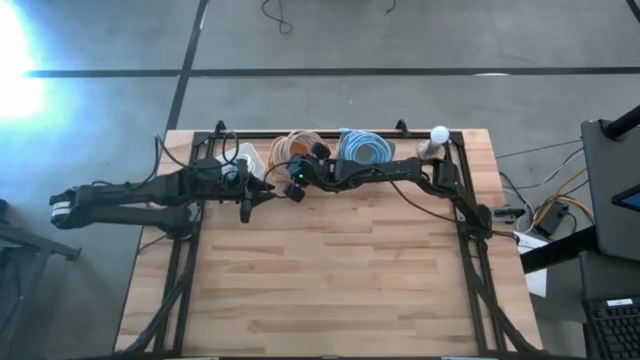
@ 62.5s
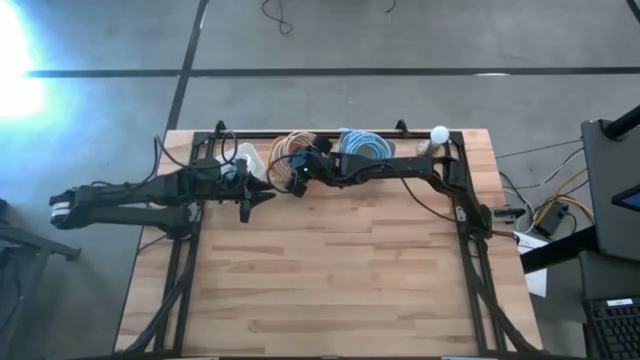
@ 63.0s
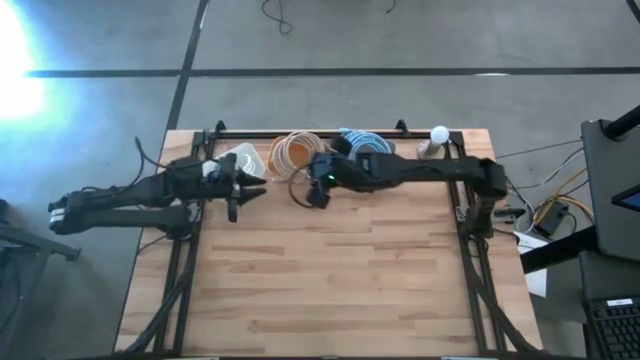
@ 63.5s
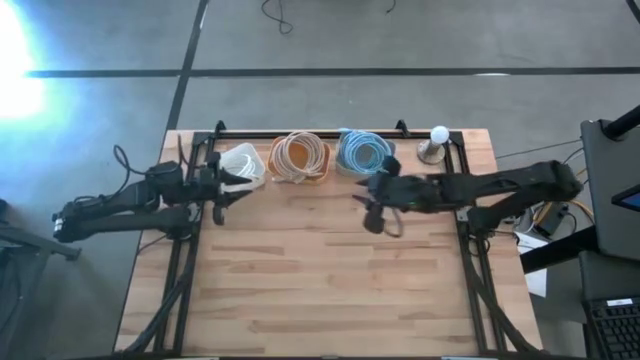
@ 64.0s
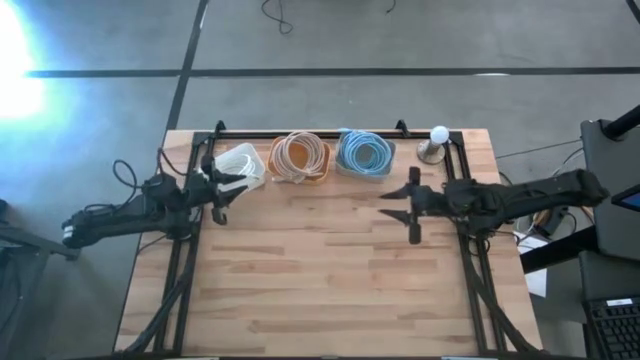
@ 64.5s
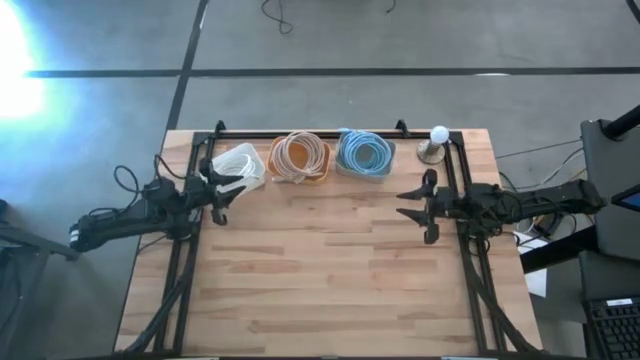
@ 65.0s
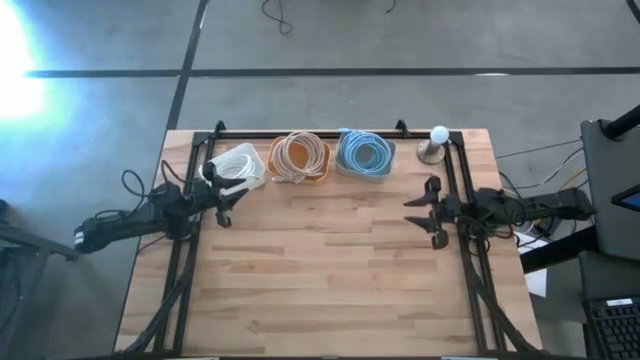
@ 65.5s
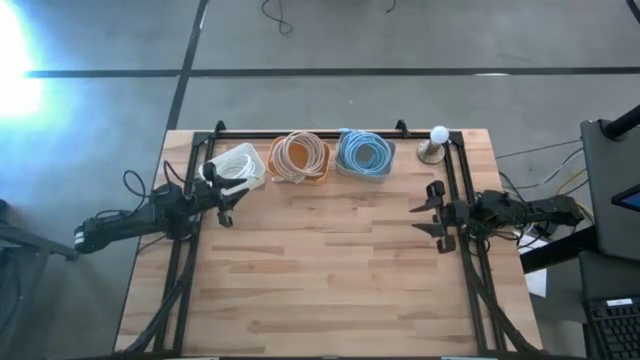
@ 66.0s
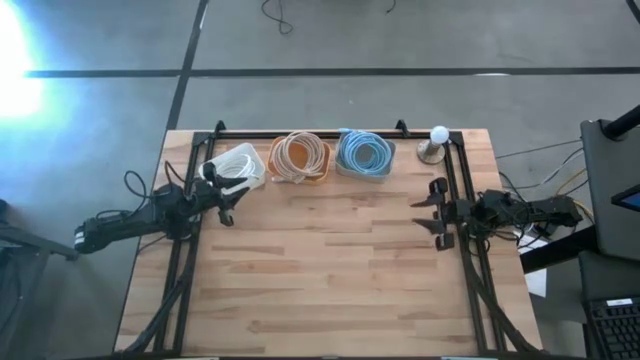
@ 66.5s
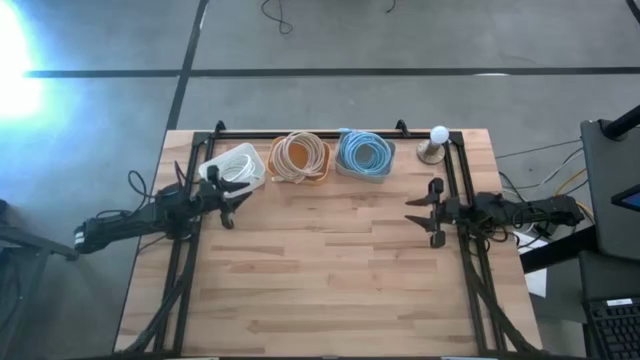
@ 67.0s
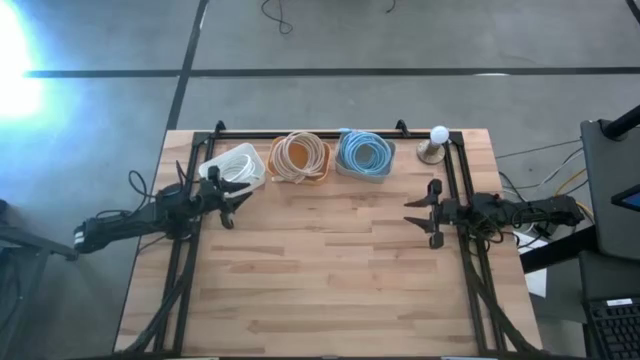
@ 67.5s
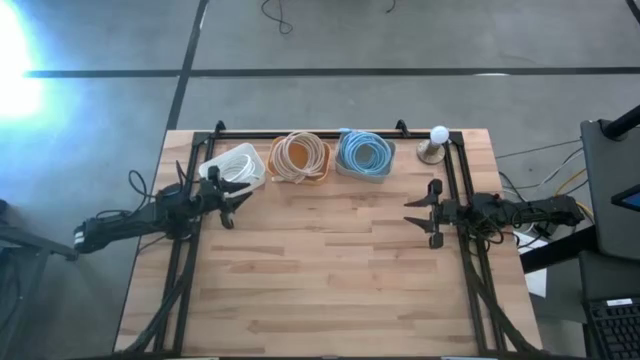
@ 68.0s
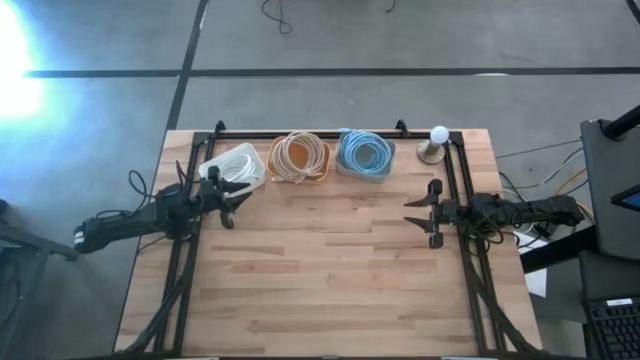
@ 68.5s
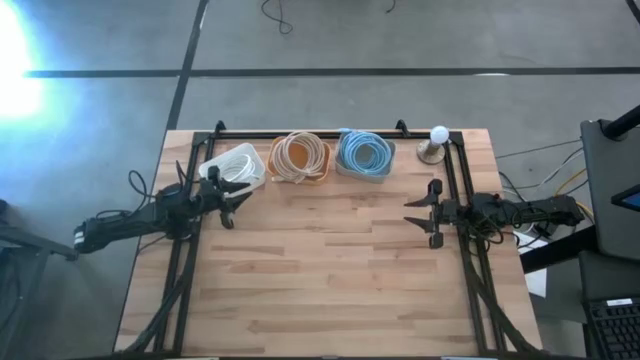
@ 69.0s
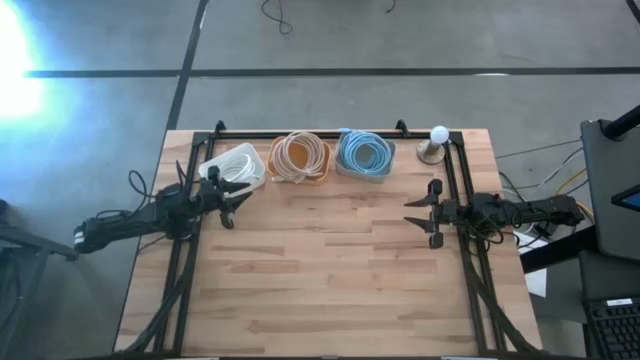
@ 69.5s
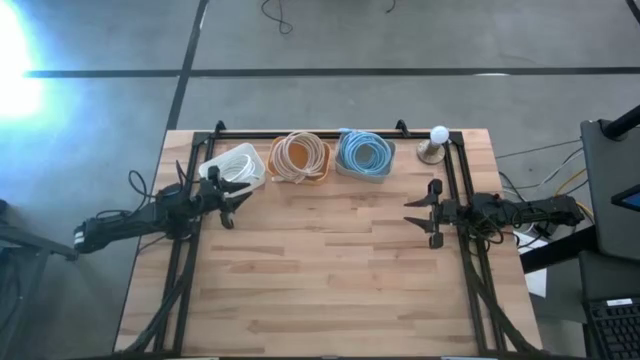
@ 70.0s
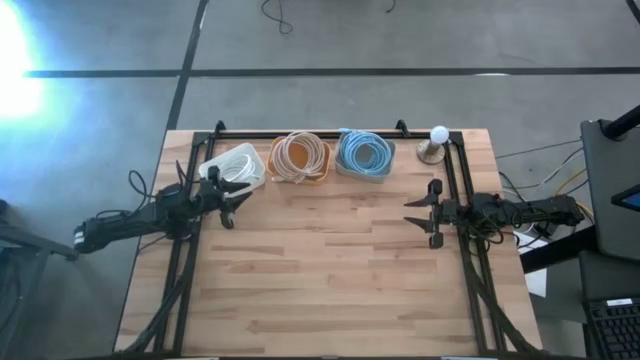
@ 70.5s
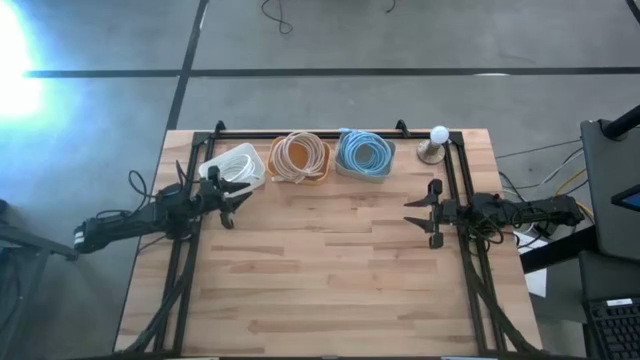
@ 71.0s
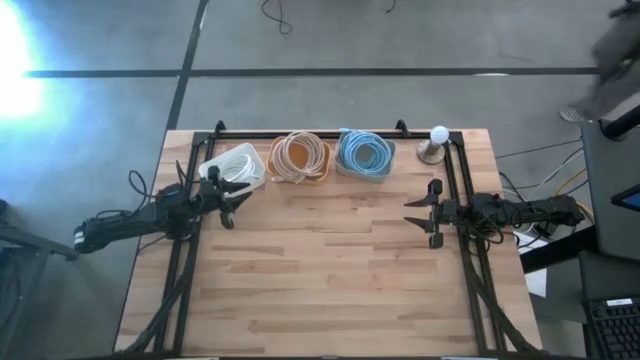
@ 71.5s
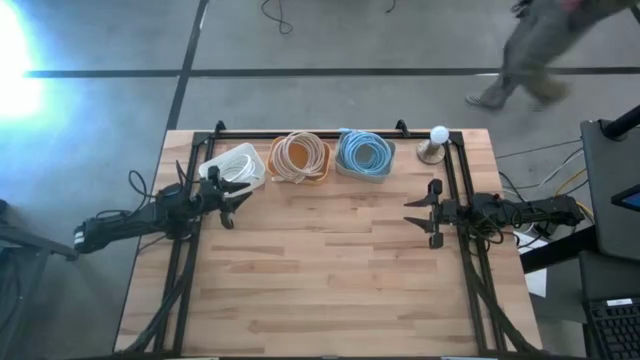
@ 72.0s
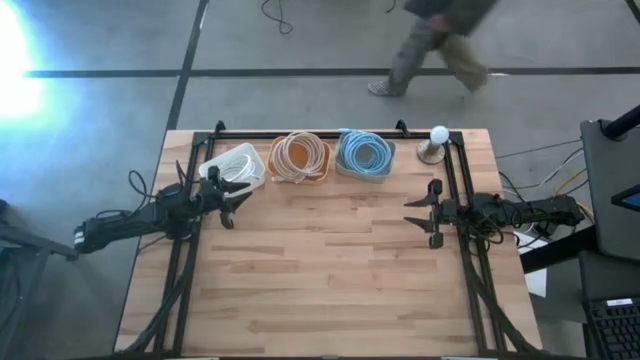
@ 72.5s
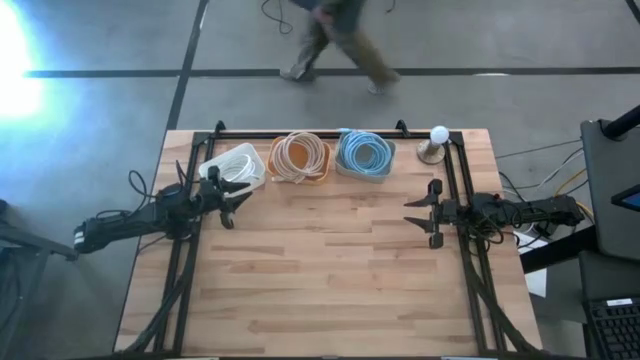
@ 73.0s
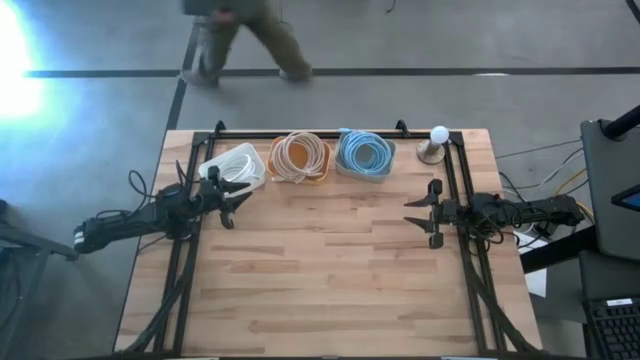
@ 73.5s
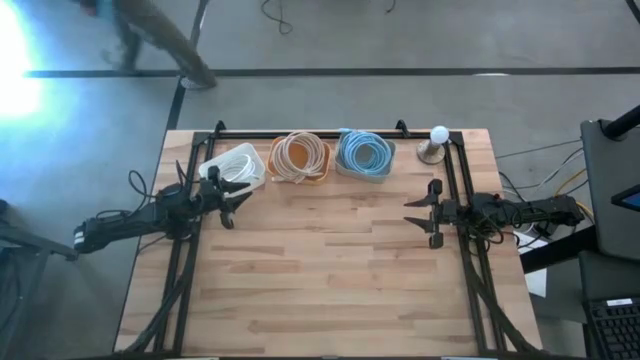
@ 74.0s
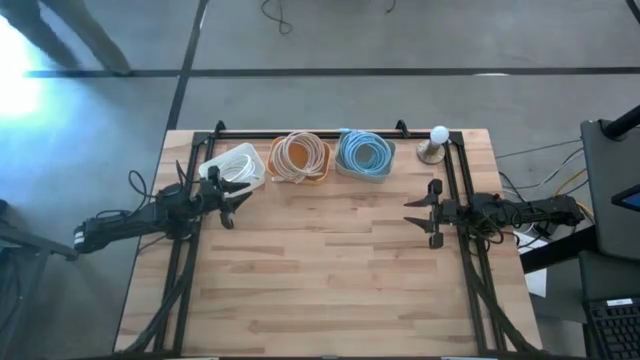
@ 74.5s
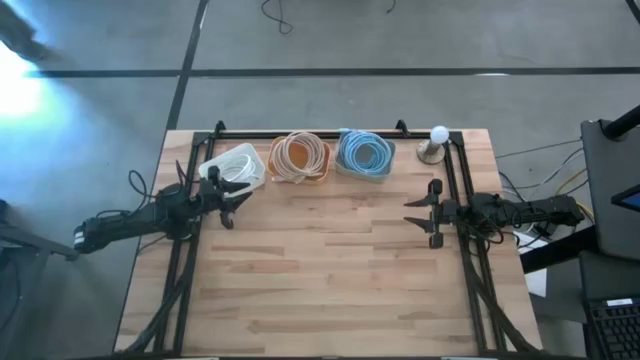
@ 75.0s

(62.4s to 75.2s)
Task: Pick & Place USB Port
Return to Home Position

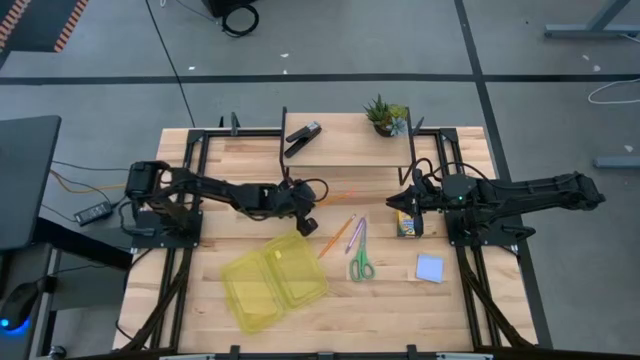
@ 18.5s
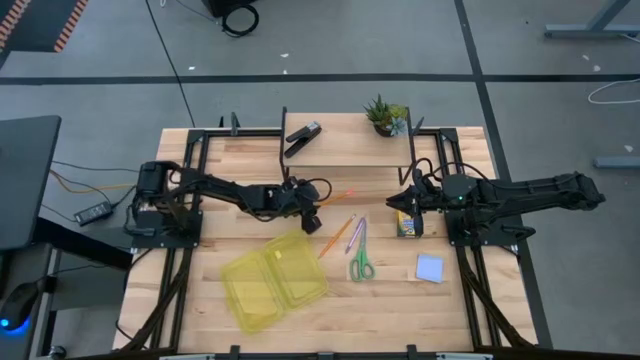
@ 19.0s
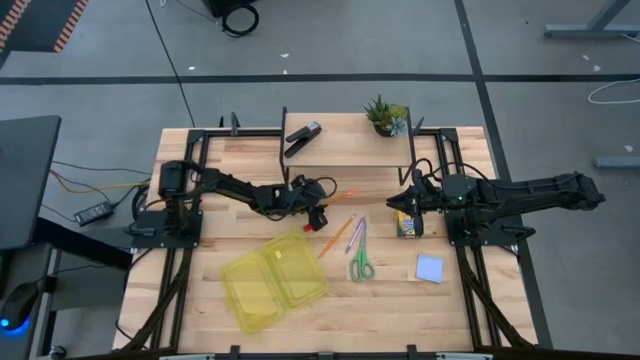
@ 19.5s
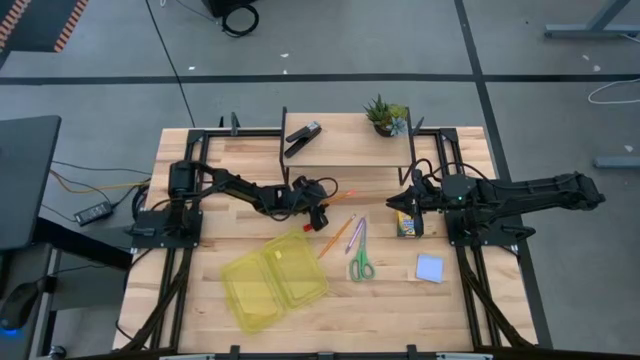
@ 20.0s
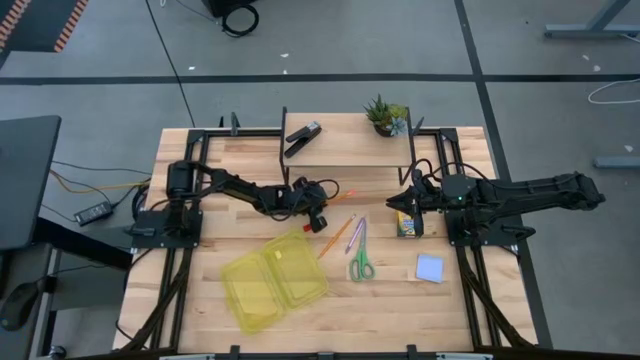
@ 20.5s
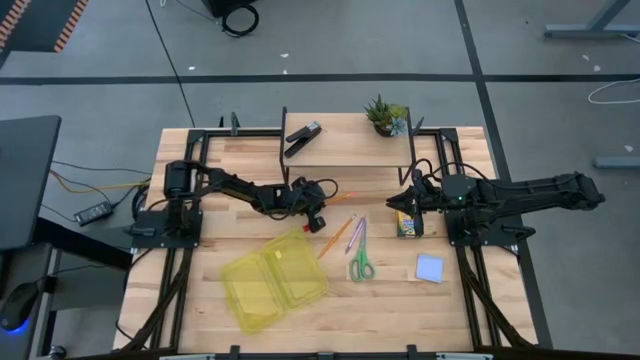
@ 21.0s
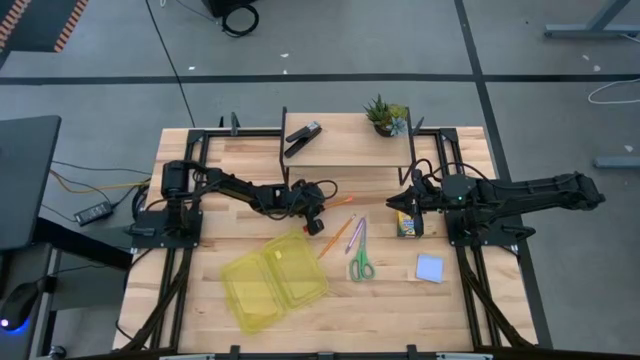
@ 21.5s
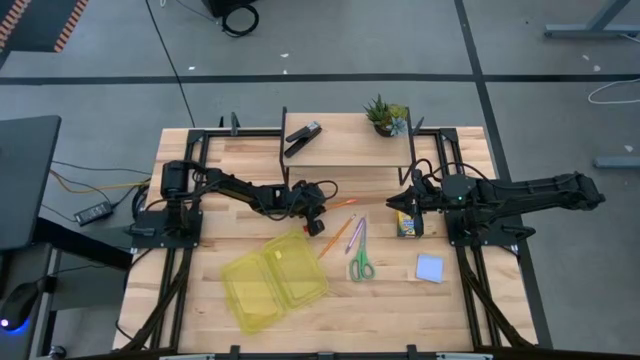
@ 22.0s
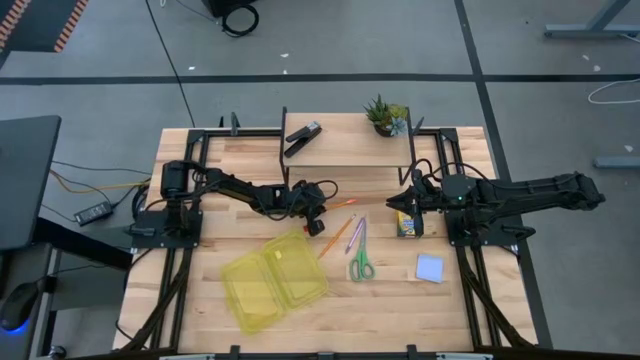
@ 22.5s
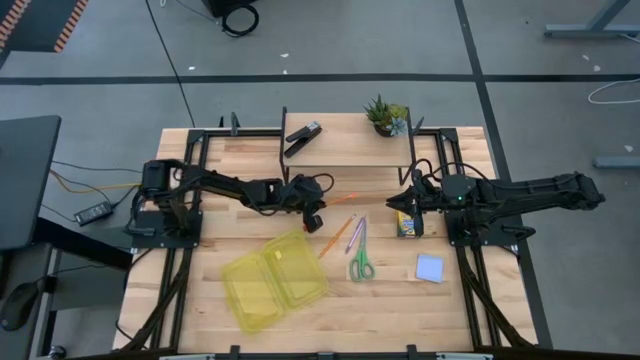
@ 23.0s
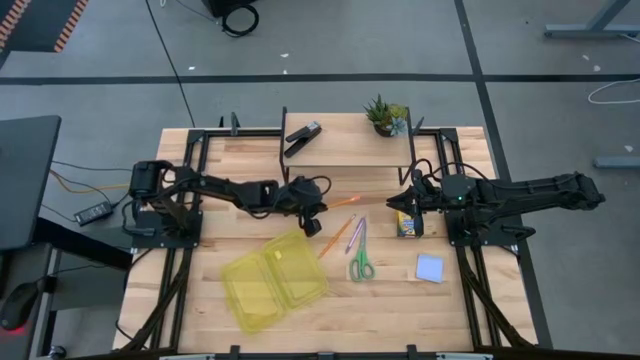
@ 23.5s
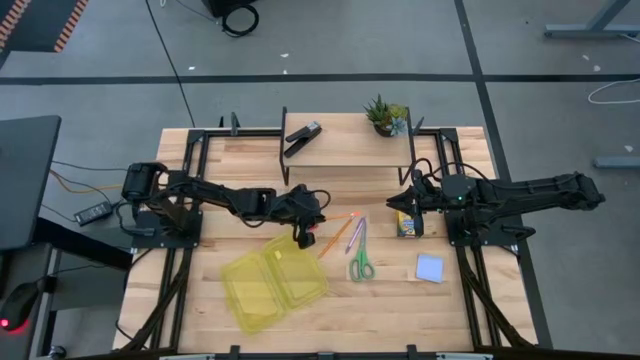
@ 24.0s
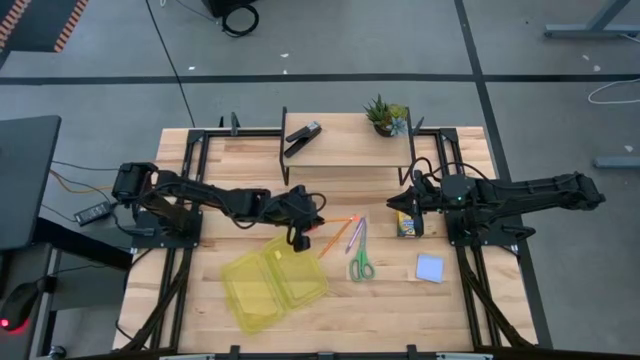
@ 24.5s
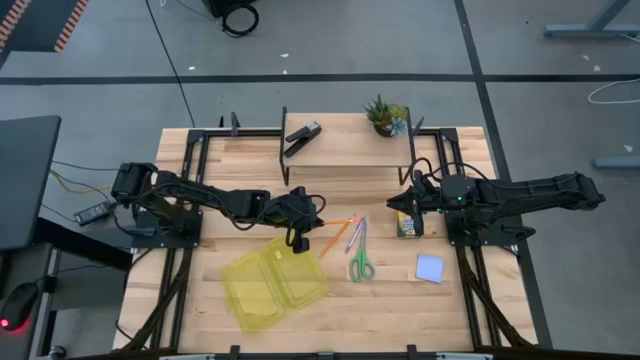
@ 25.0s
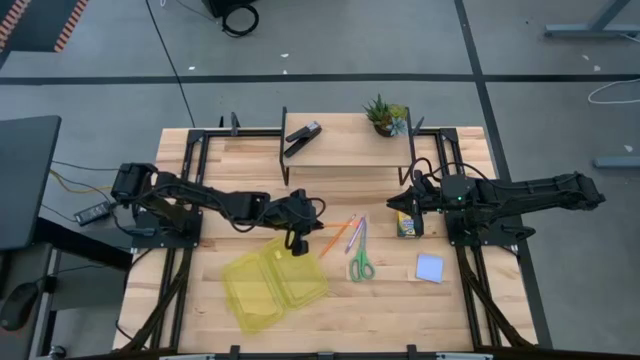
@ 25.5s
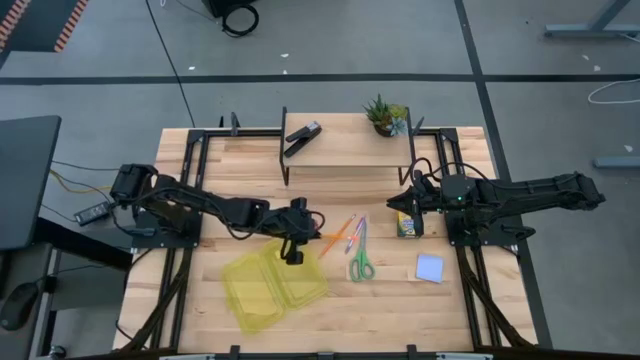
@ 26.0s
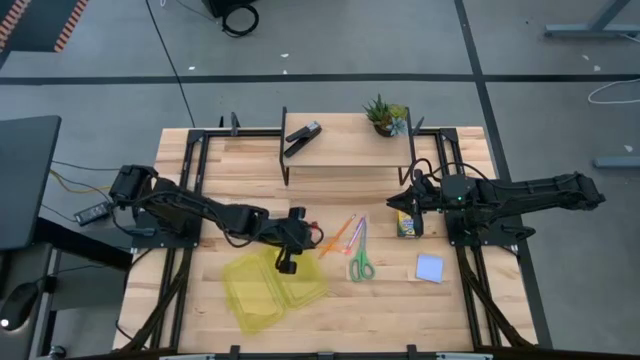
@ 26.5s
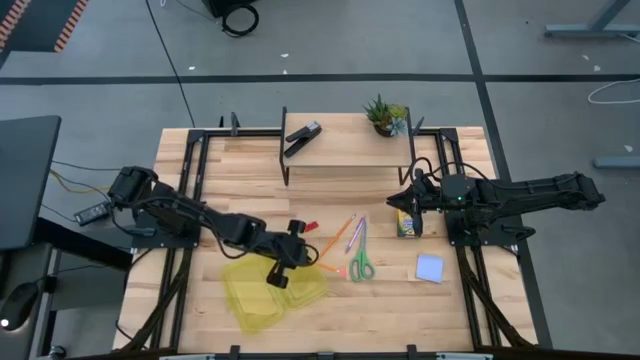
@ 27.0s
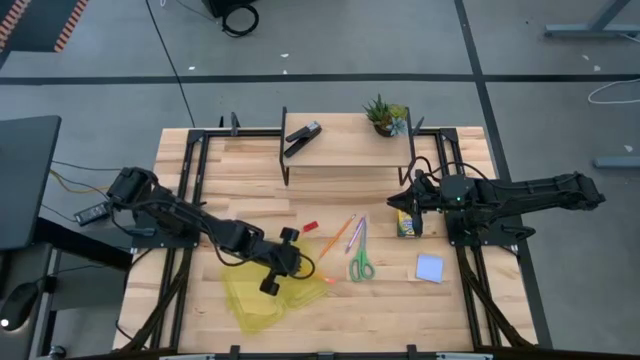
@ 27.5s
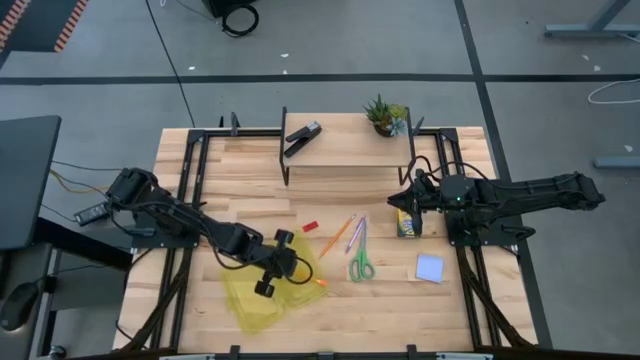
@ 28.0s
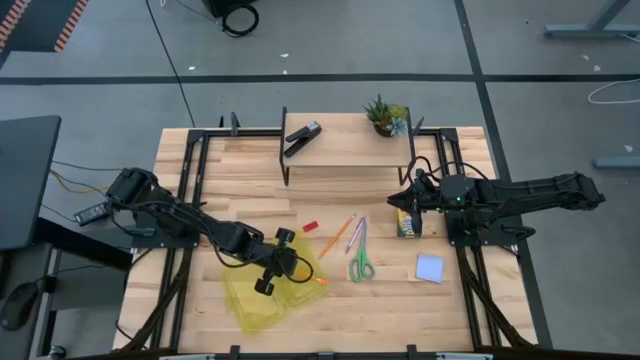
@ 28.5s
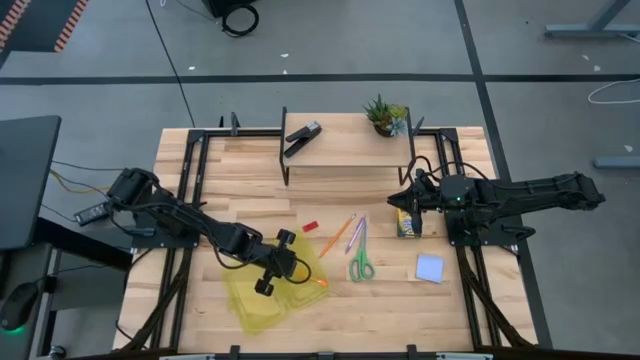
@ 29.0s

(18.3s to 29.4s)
Task: Pack school essentials
Put the left orange pencil into the supply box
